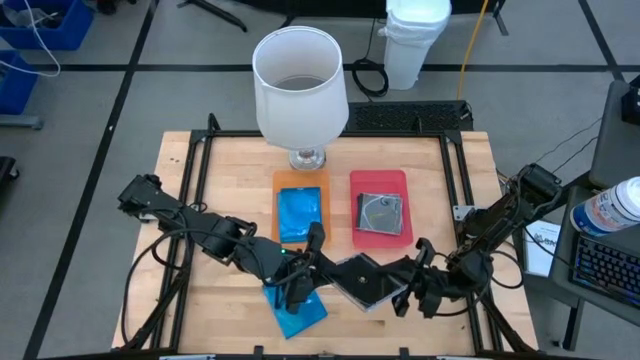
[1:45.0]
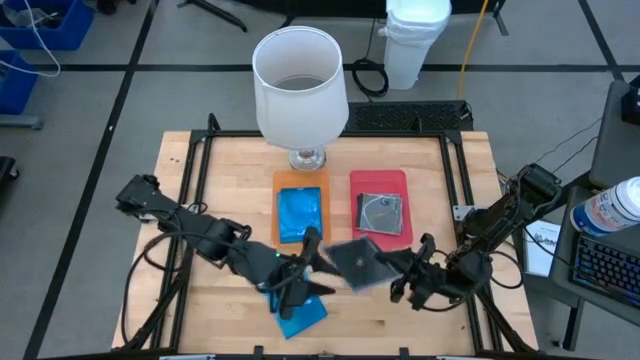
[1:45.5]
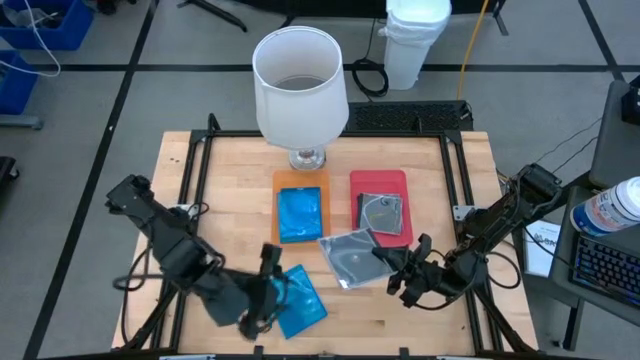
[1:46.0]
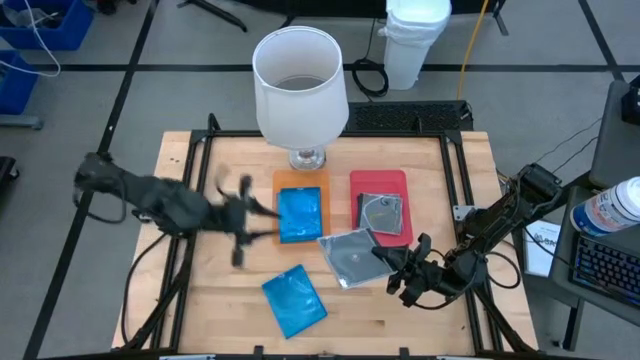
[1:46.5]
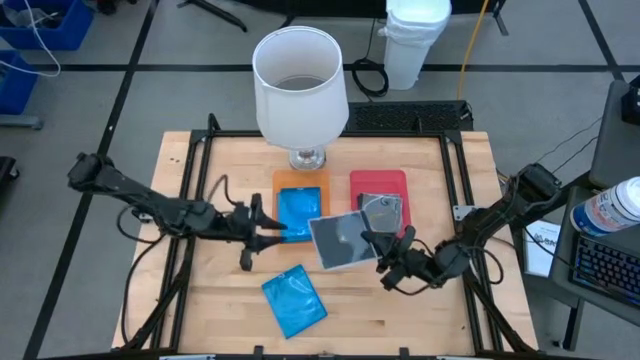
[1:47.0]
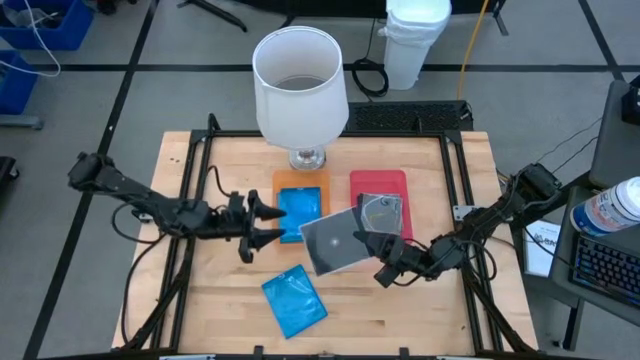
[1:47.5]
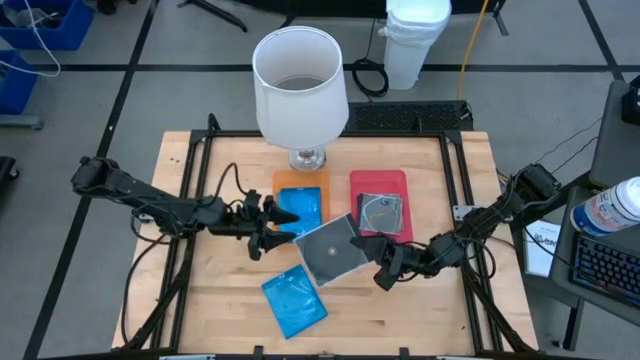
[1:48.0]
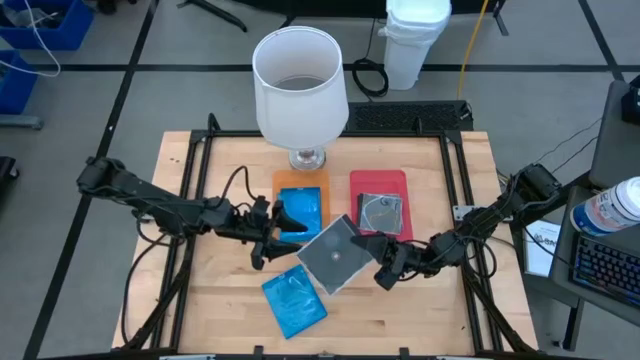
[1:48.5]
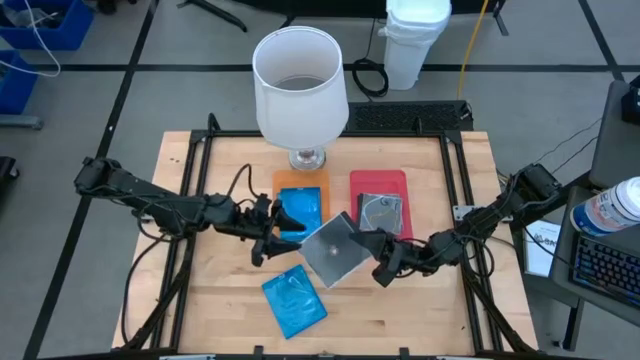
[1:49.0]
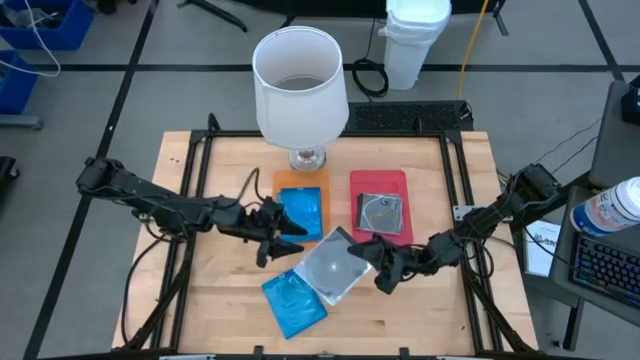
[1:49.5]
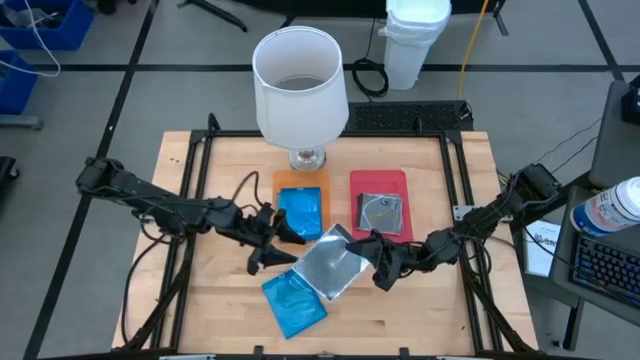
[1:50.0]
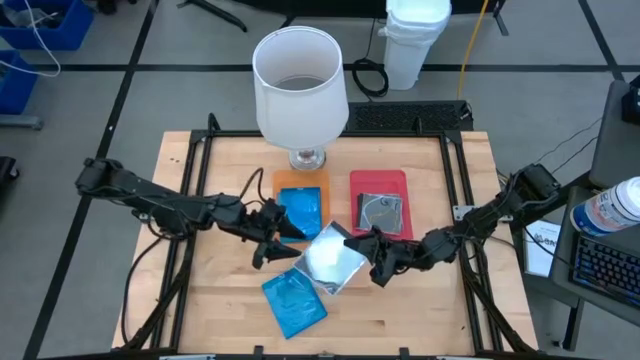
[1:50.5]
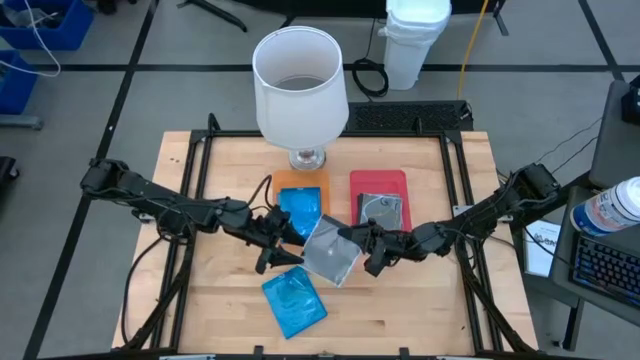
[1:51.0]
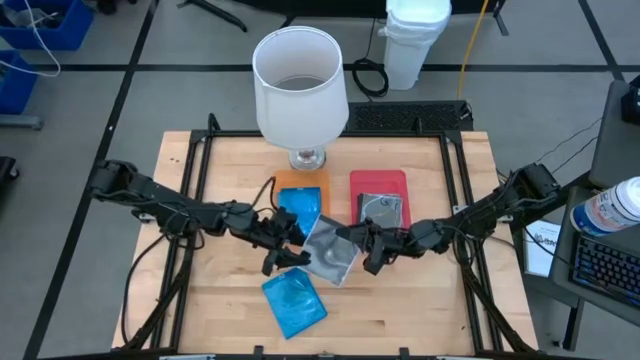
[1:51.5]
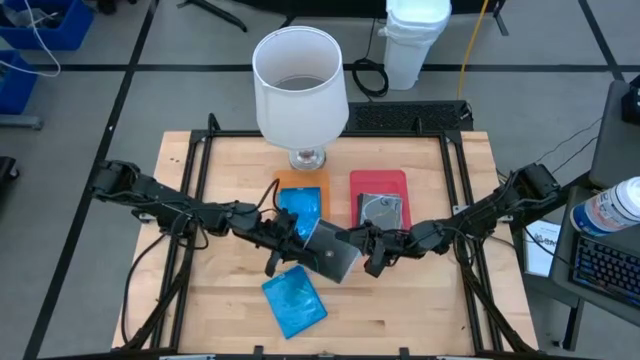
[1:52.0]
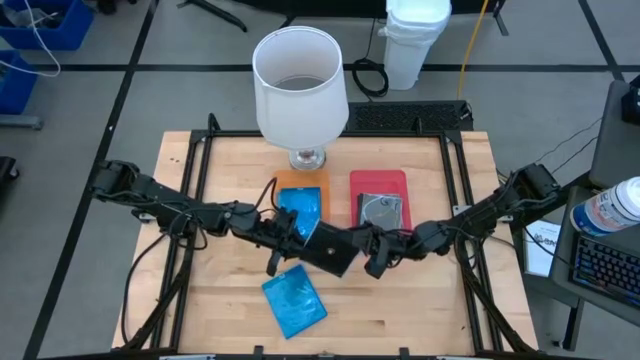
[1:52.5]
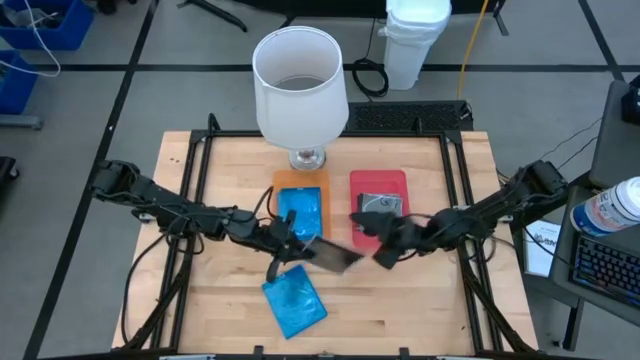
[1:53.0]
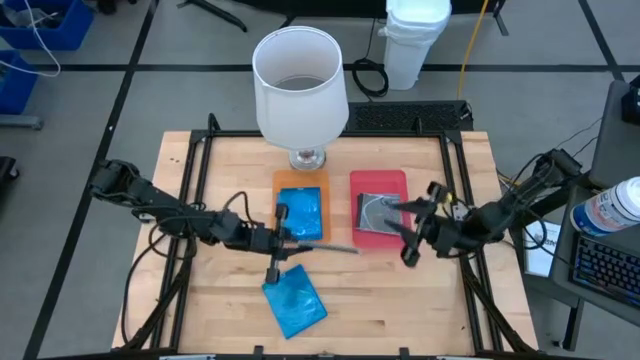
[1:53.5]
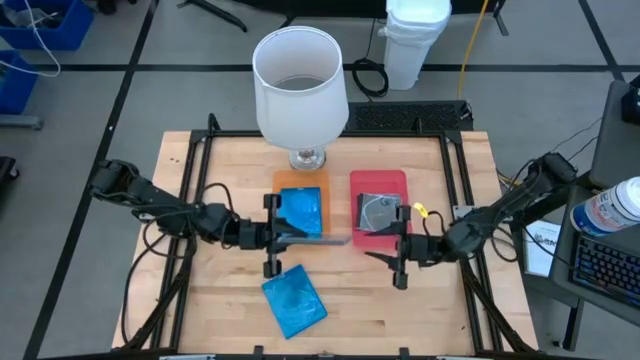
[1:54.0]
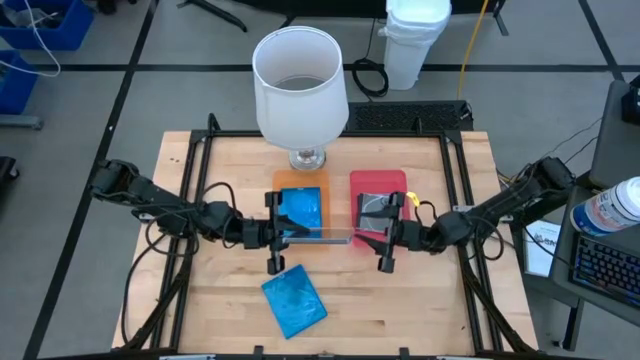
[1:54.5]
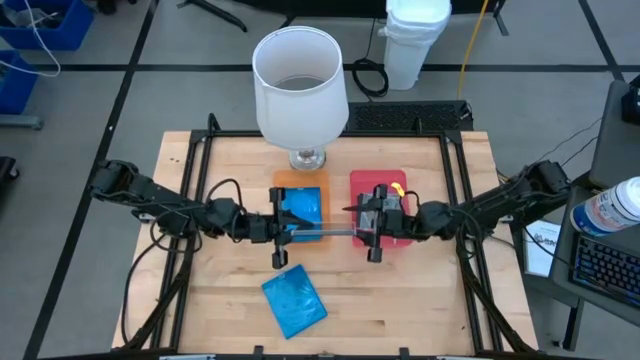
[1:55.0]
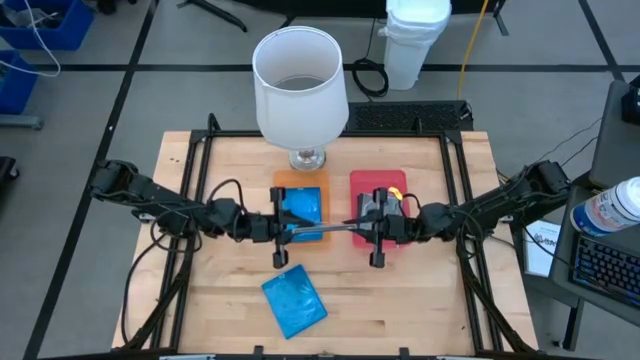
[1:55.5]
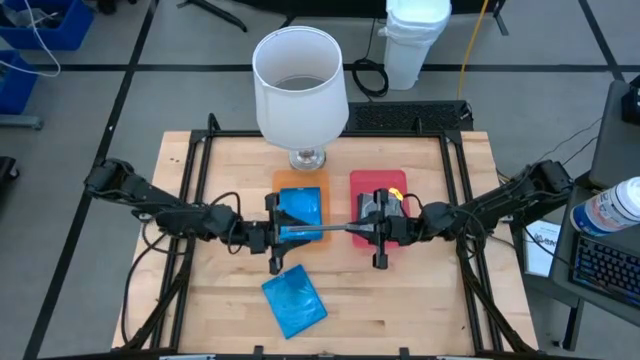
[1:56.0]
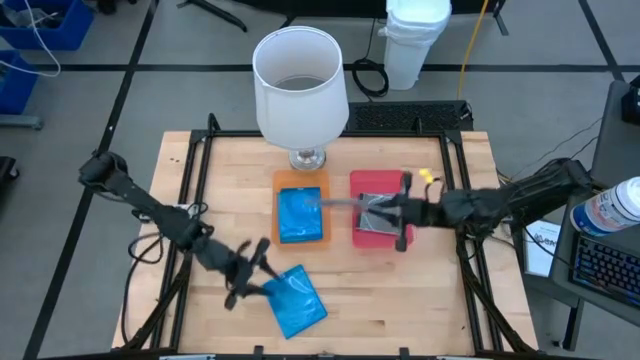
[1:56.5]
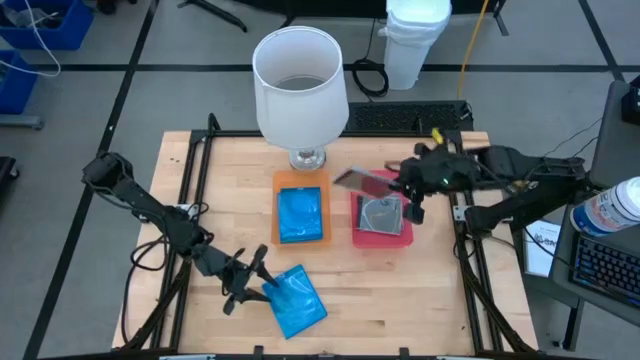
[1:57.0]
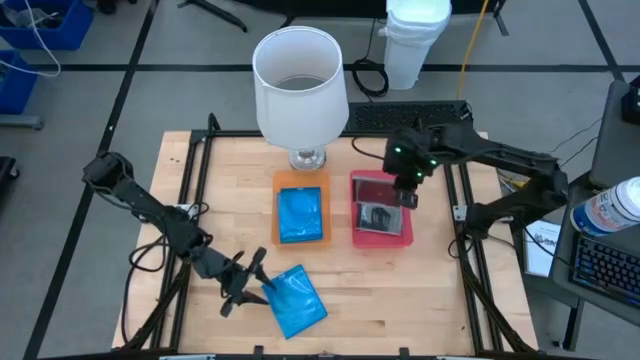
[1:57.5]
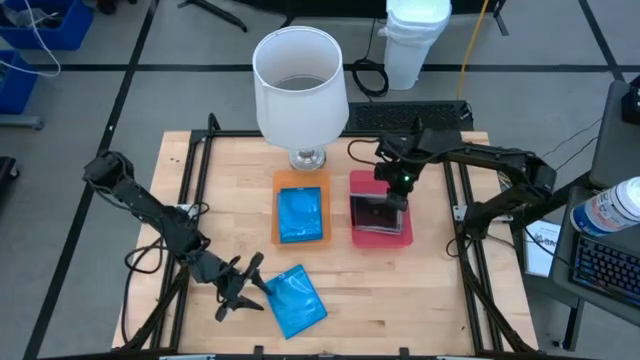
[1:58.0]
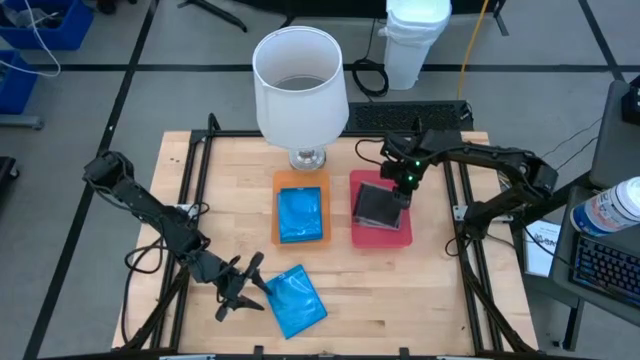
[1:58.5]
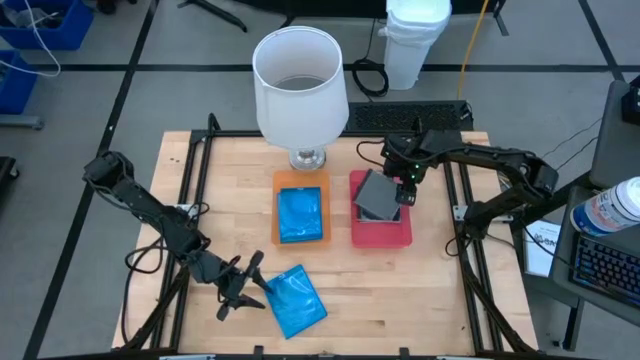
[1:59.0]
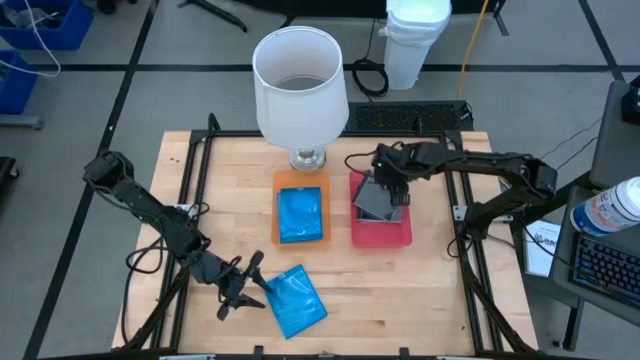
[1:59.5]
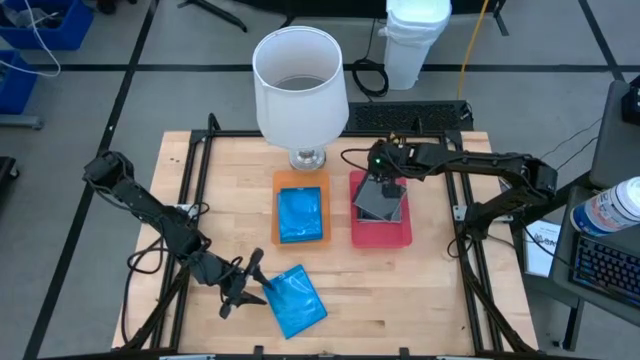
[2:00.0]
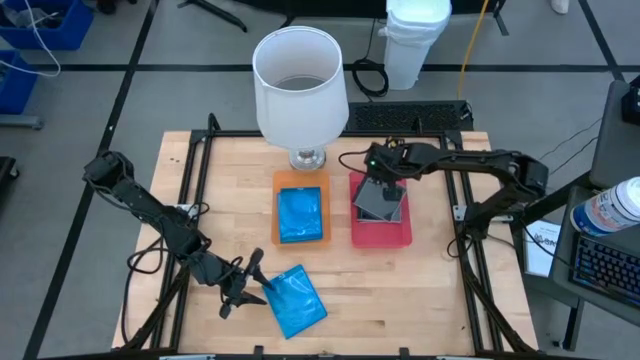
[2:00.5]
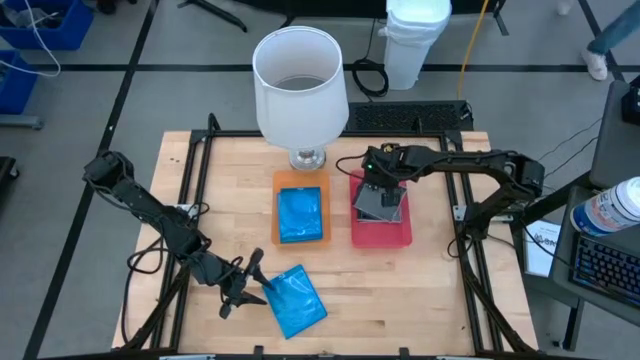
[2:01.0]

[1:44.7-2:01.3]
Task: Pick & place jewel cases by type
Put the black CD case into the red bin

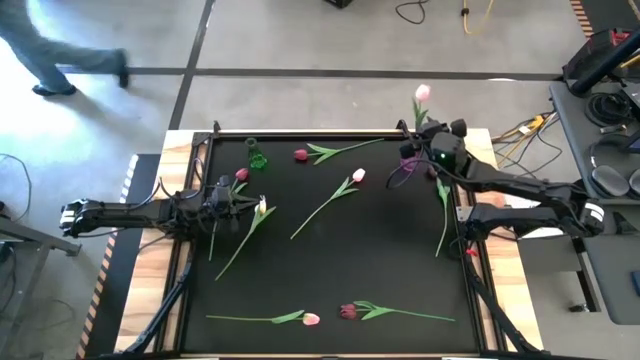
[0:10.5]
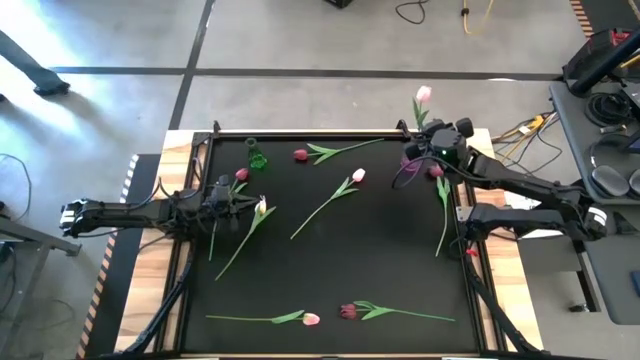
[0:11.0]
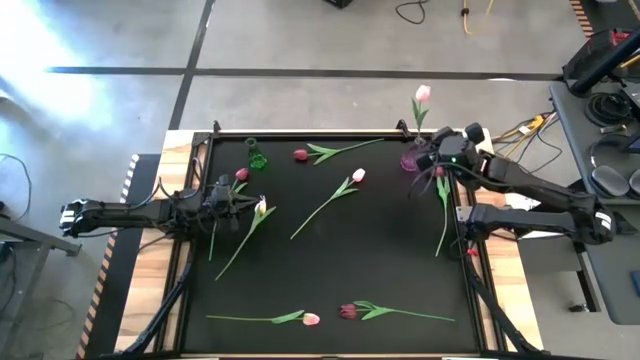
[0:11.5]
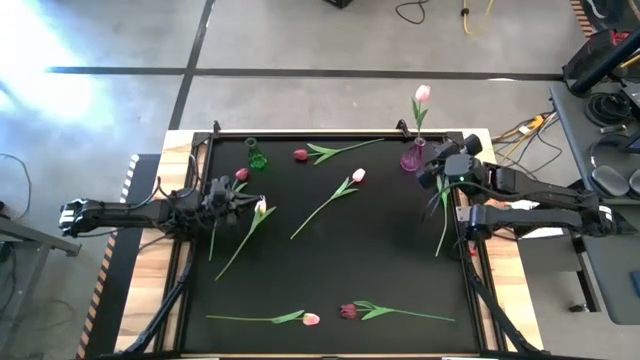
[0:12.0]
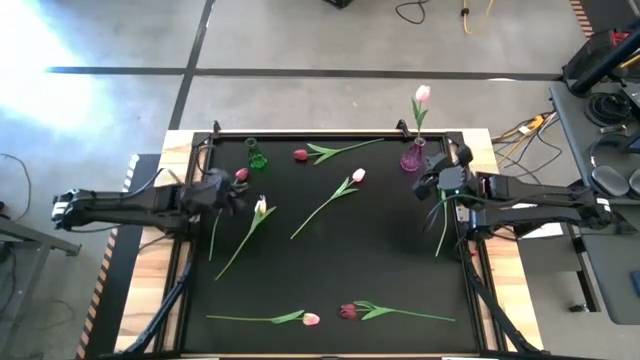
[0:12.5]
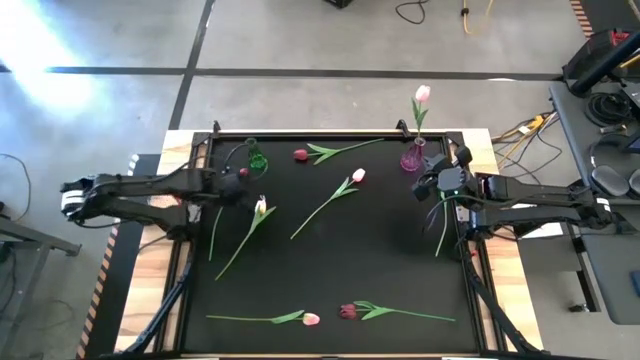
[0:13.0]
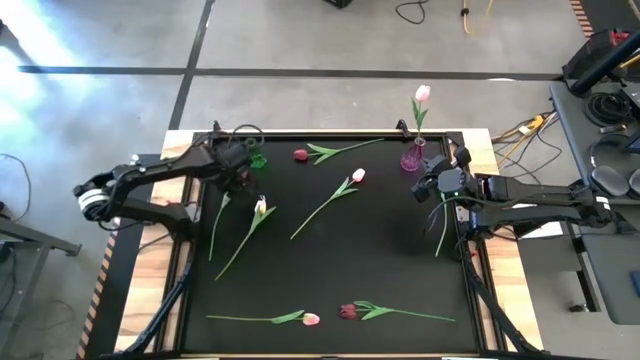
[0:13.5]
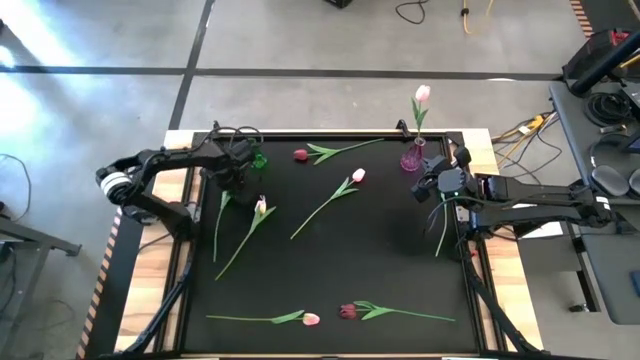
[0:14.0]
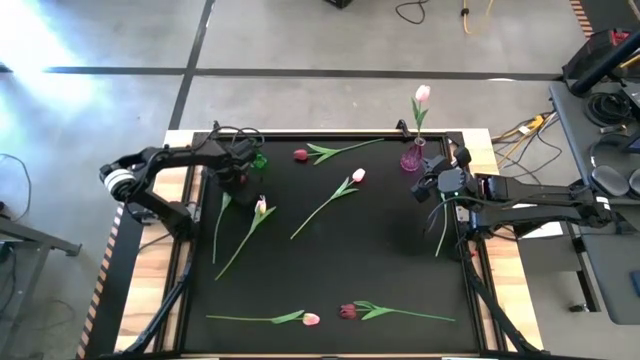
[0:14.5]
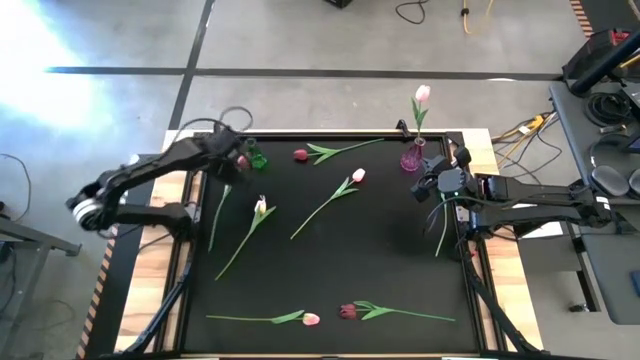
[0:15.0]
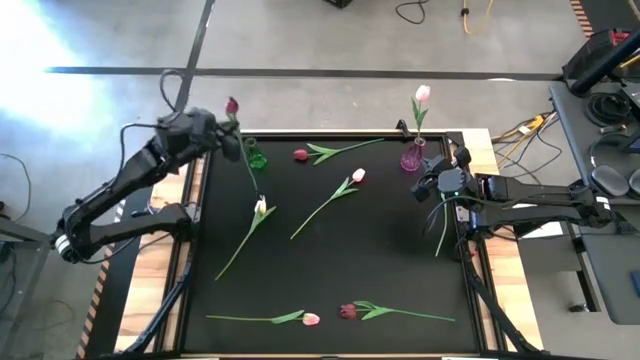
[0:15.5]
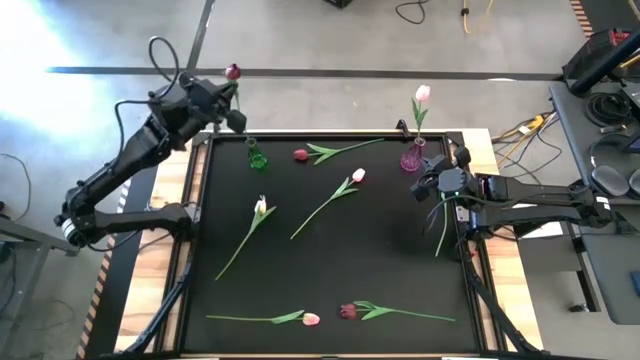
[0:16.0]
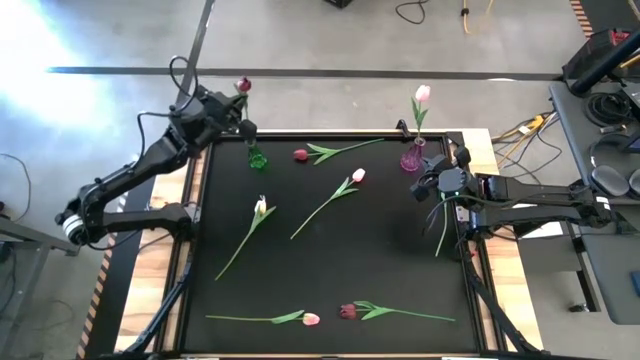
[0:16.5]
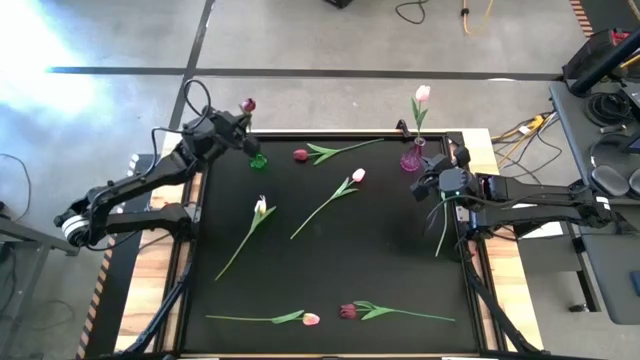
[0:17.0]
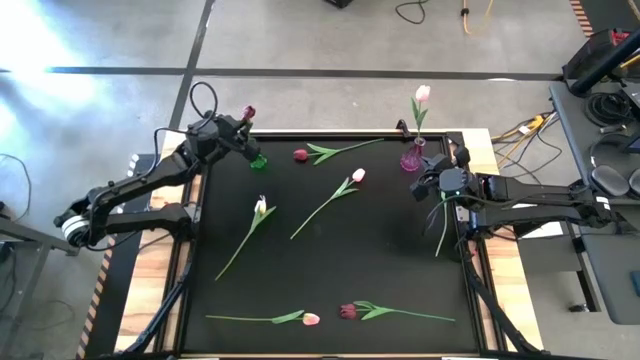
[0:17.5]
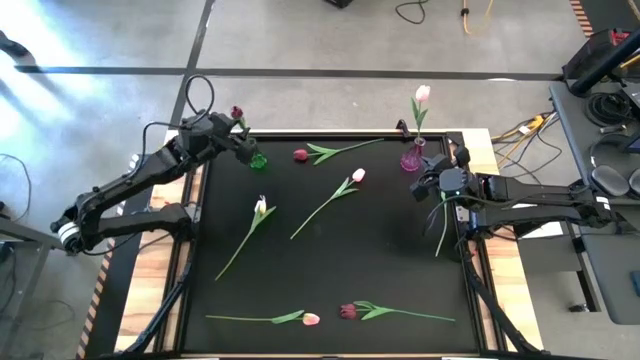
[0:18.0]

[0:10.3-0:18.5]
Task: Sort flowers into vase by color
Put the red flower into the green vase
